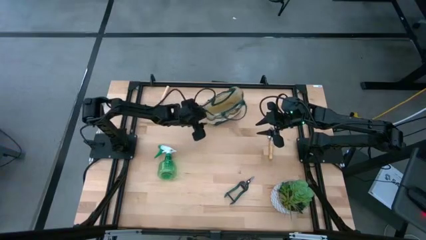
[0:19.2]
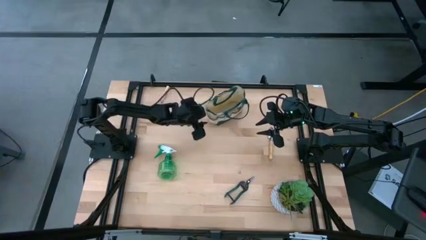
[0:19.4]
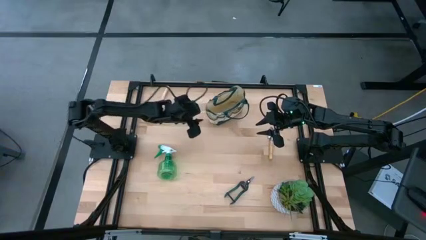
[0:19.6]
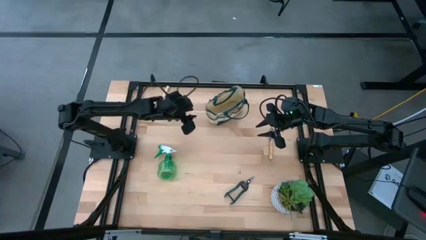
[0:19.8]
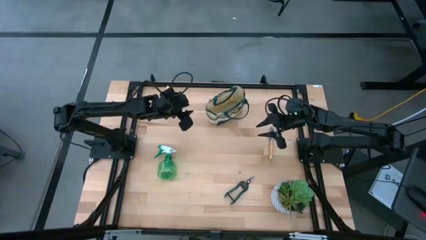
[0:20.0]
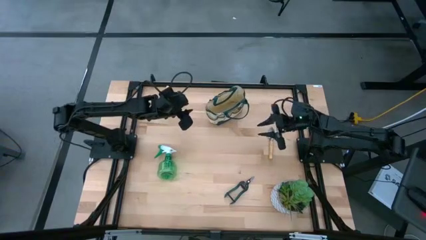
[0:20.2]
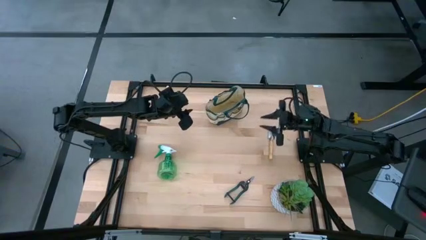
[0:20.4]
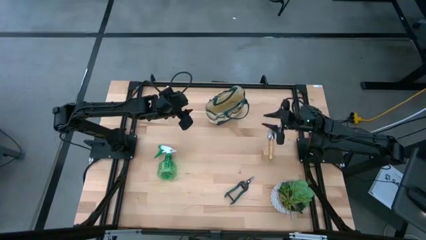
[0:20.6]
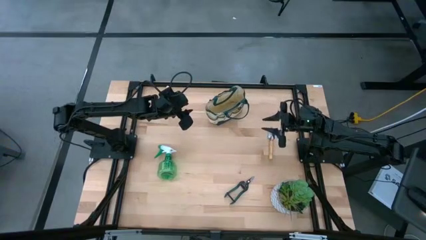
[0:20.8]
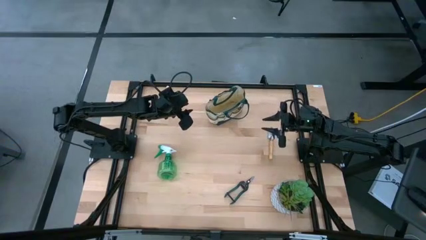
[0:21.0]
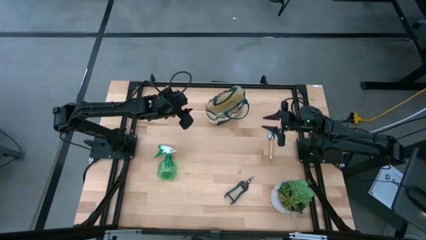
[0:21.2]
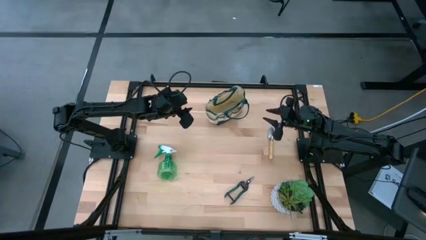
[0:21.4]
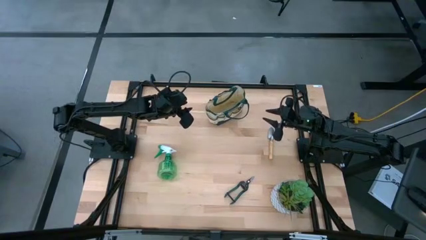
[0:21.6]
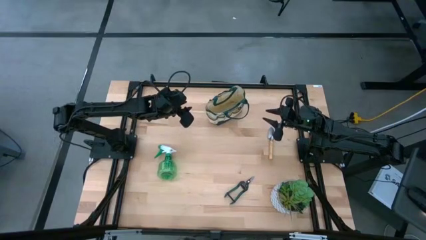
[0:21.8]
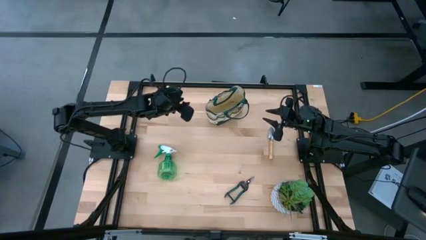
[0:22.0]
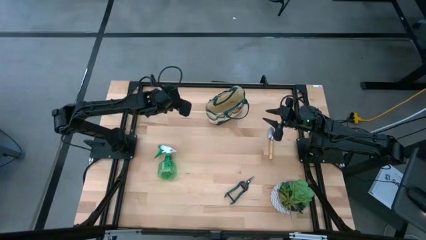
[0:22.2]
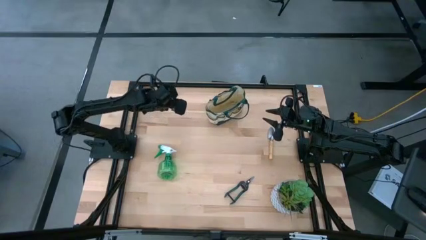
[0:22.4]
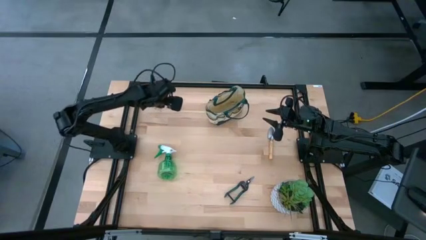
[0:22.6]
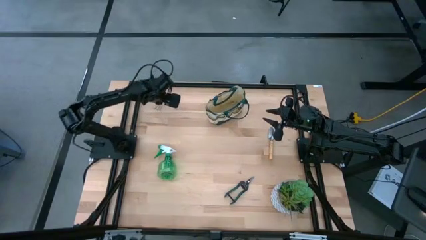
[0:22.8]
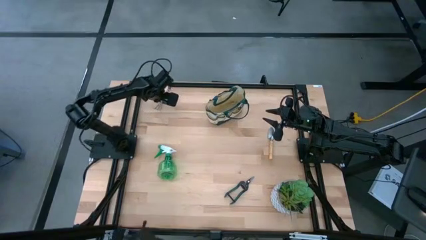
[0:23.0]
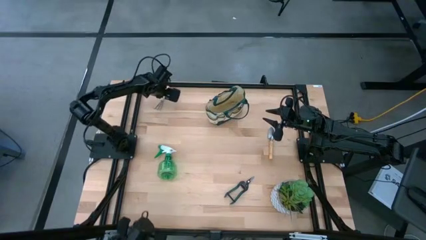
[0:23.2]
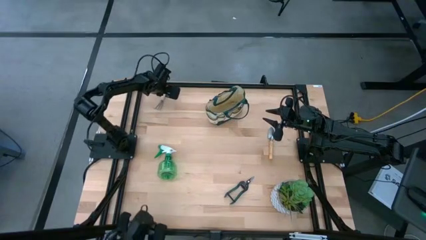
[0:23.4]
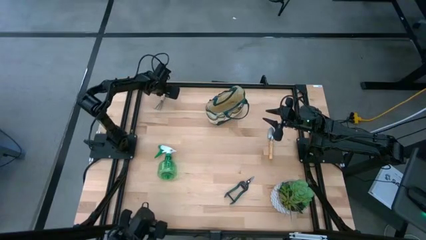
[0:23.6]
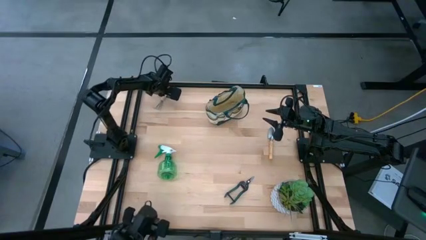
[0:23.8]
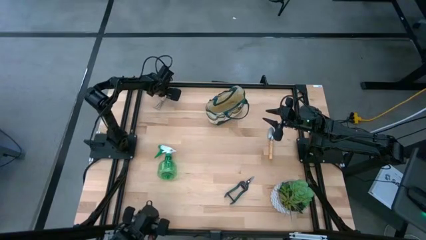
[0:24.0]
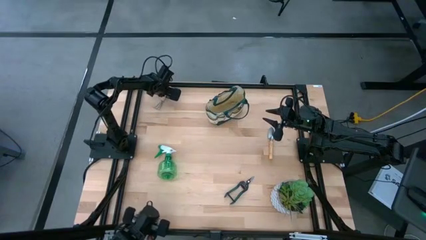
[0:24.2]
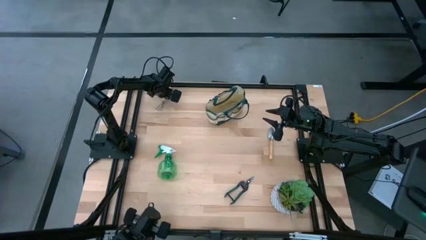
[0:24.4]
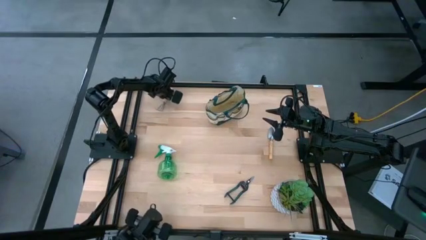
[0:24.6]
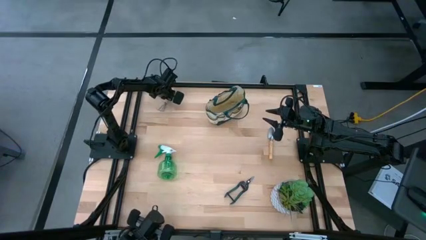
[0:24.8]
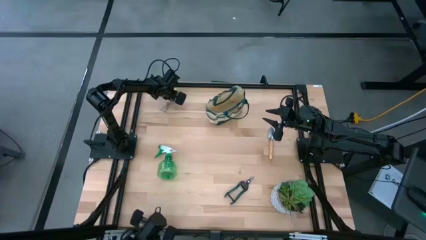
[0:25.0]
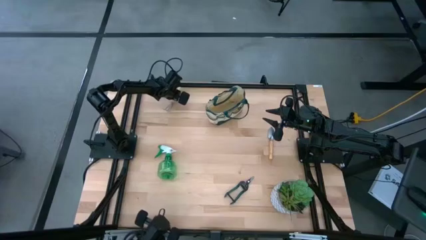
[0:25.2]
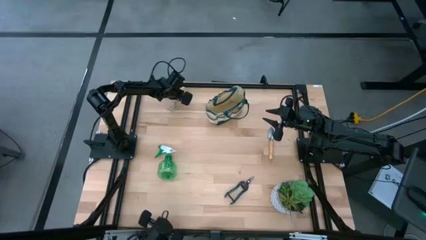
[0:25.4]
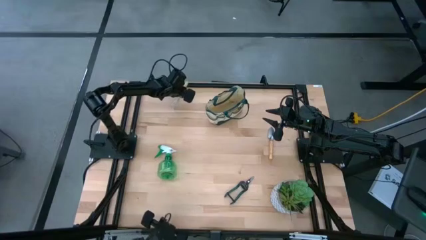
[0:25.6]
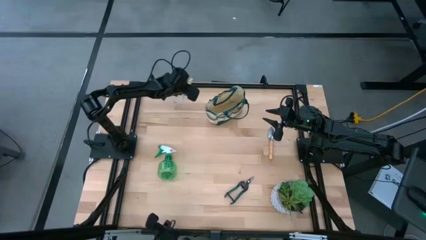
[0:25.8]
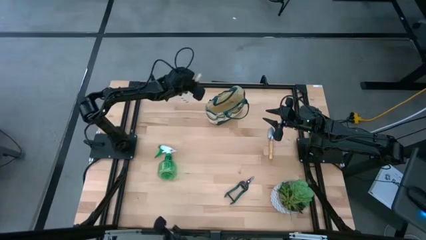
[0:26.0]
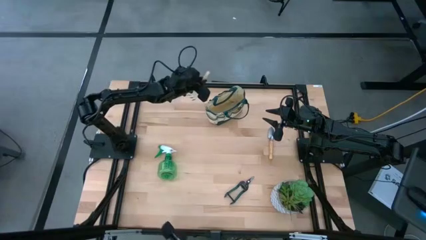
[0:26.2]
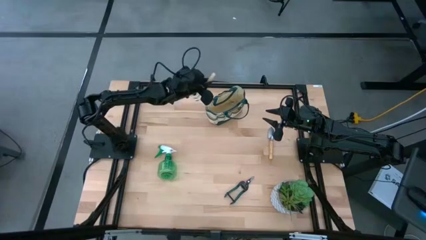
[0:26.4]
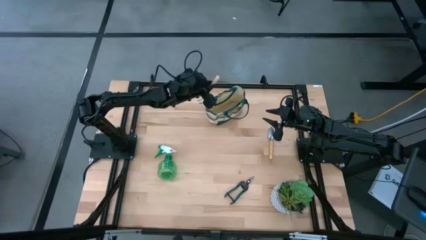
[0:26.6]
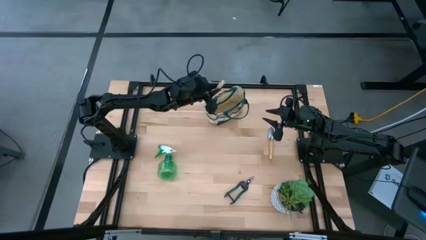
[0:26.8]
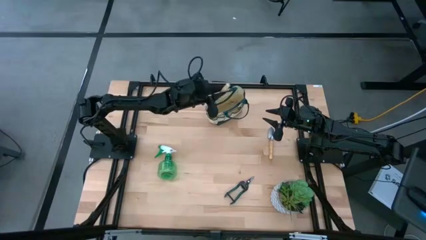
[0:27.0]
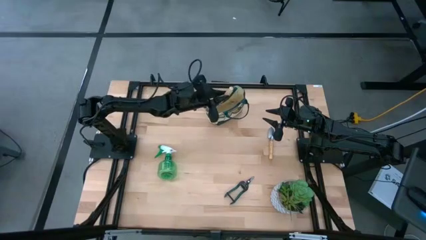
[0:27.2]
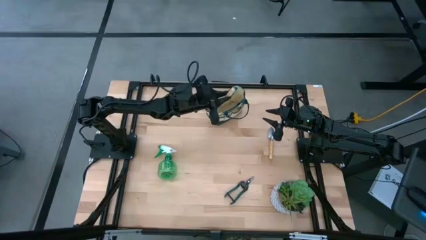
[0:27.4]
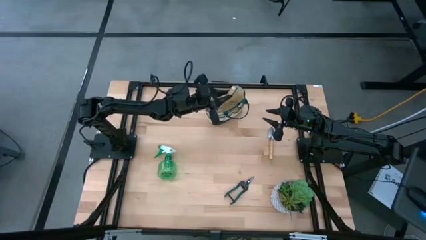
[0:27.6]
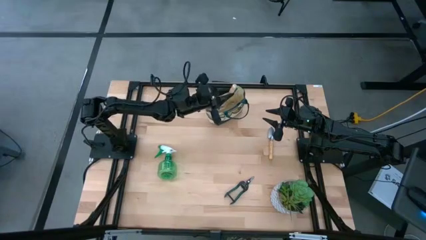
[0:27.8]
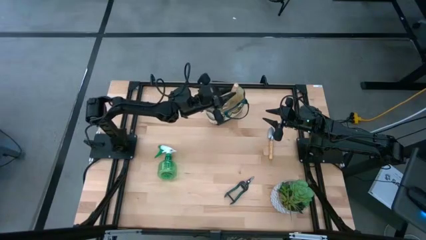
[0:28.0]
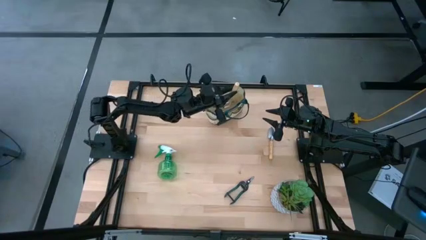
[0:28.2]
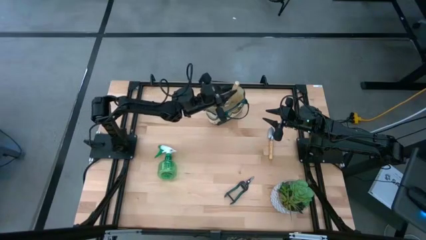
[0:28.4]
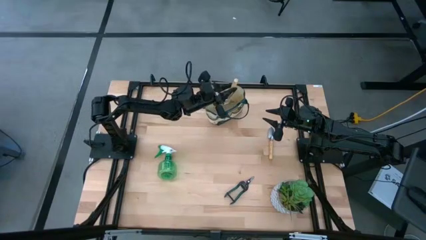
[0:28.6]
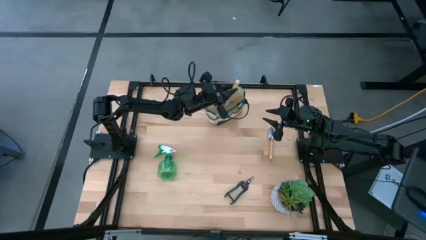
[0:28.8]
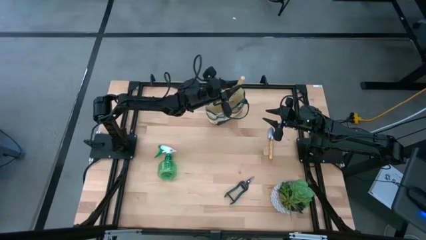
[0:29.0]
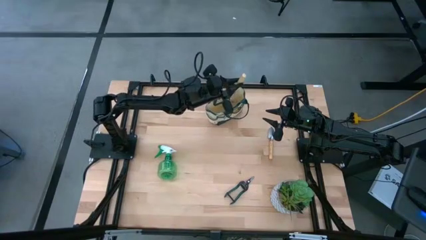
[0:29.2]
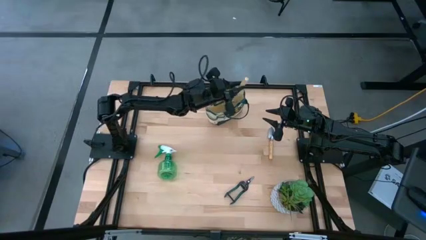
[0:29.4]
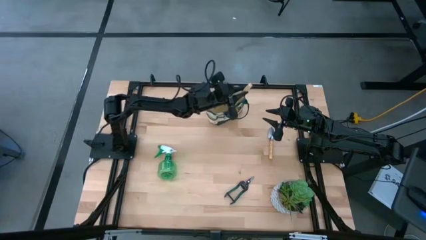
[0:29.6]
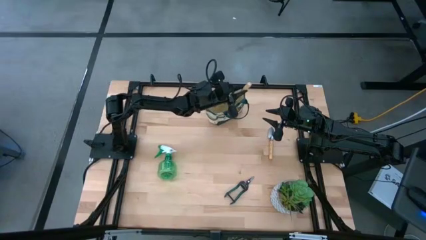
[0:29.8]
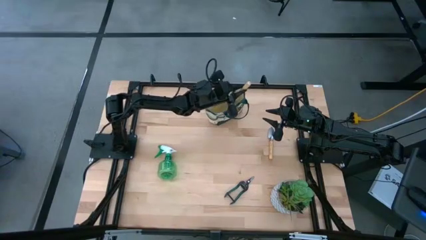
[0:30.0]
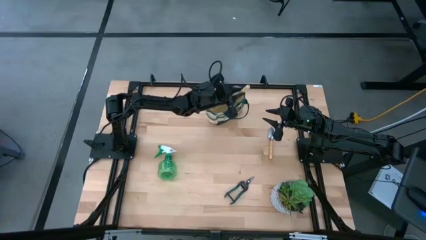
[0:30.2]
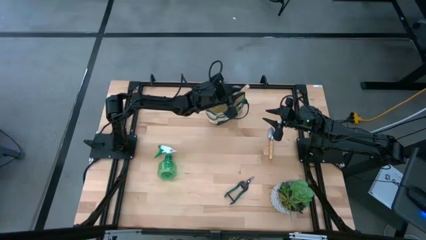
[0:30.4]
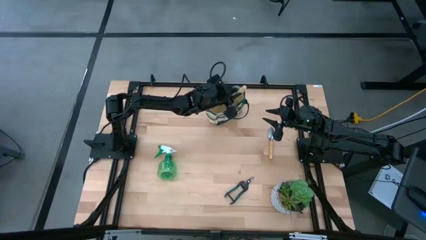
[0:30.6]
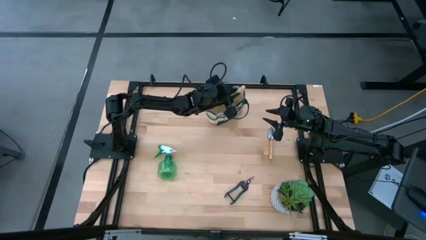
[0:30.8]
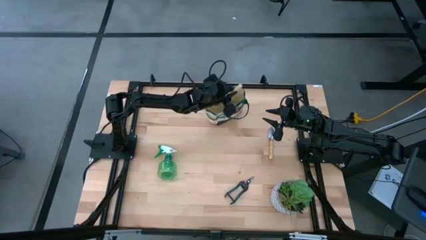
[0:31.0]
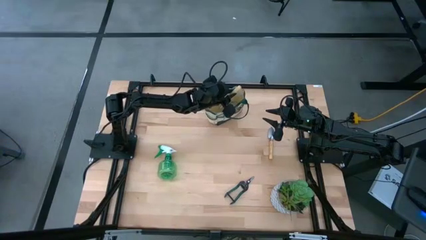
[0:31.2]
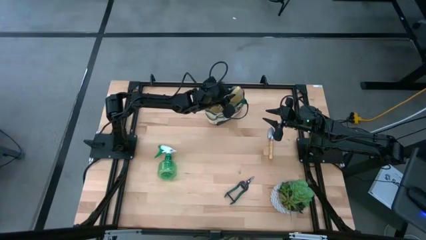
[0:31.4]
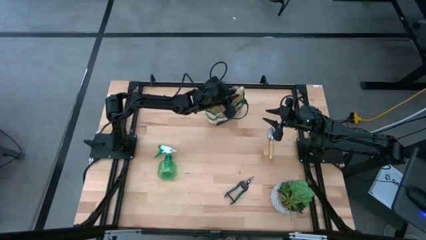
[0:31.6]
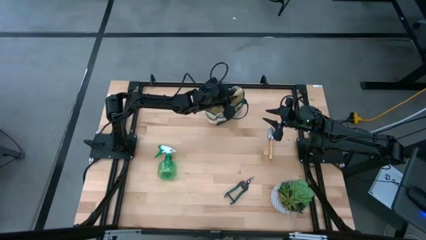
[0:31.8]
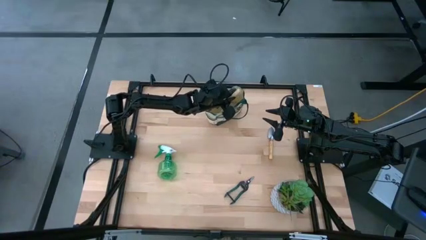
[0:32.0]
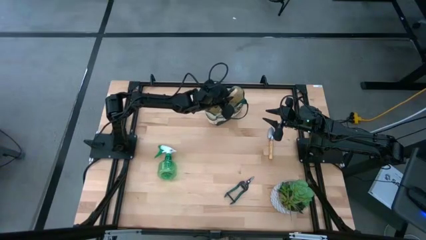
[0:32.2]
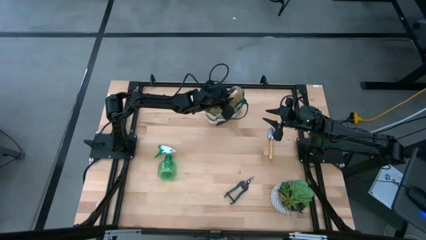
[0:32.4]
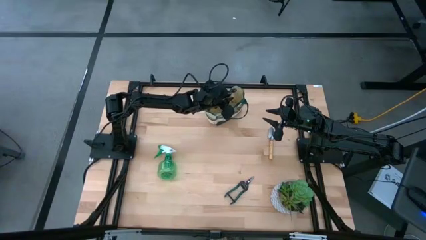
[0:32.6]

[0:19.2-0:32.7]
Task: Pick & Place Garden tools in Gardening bag
Put the brown hand rake into the green gardening bag

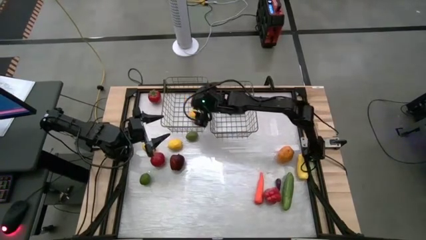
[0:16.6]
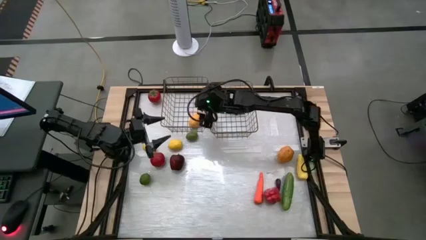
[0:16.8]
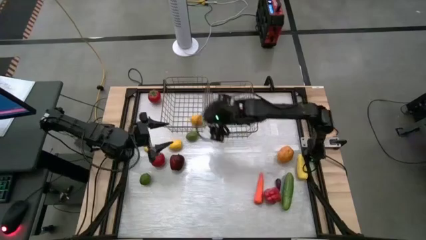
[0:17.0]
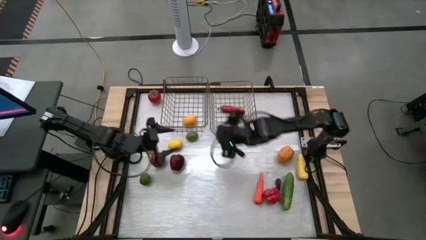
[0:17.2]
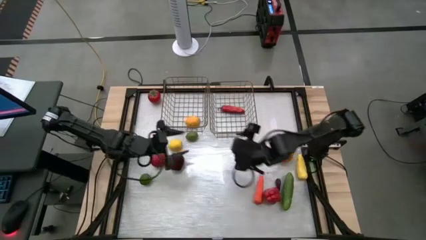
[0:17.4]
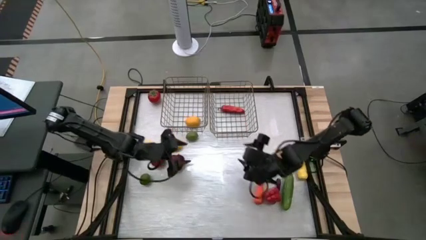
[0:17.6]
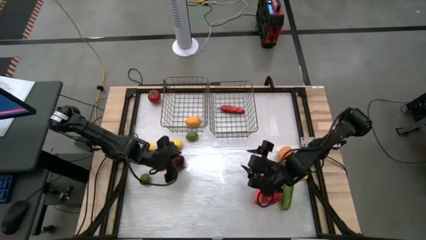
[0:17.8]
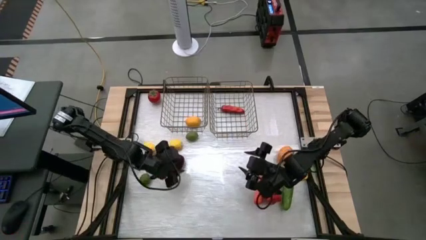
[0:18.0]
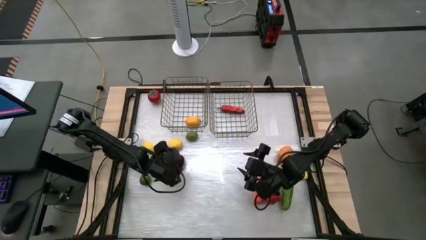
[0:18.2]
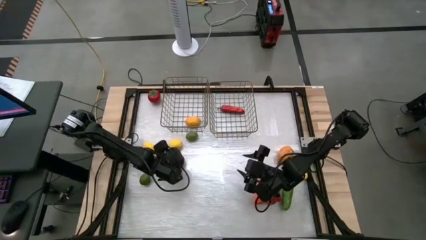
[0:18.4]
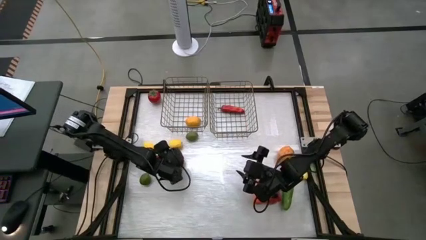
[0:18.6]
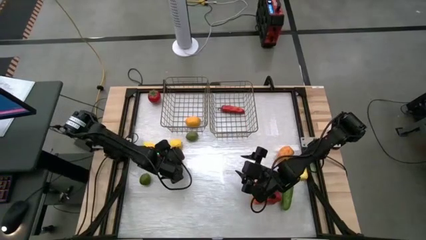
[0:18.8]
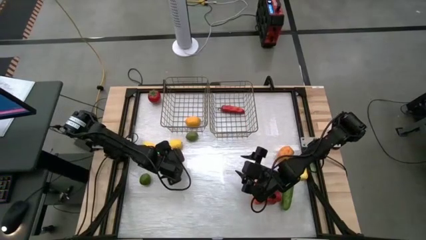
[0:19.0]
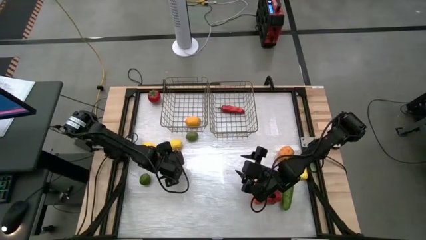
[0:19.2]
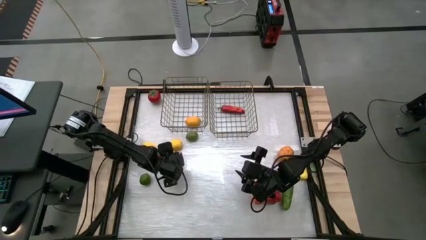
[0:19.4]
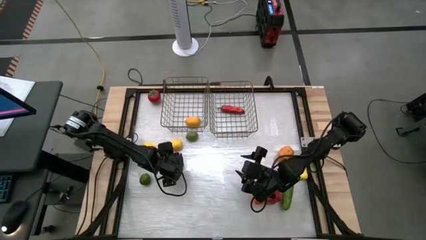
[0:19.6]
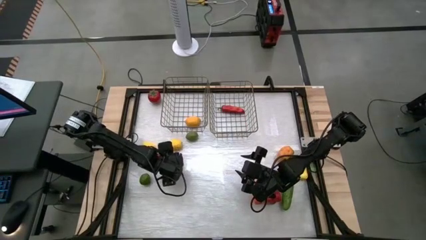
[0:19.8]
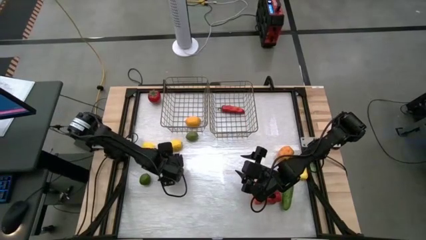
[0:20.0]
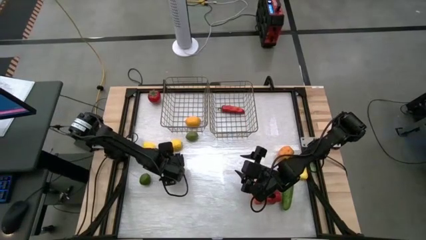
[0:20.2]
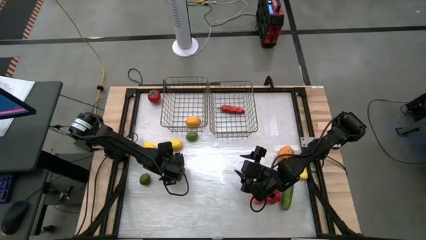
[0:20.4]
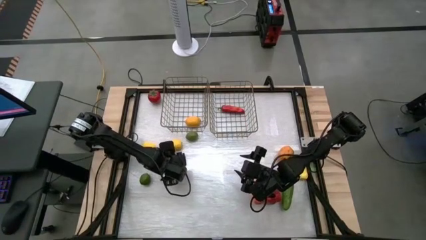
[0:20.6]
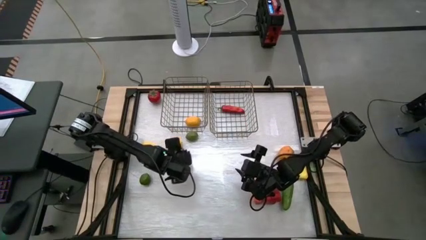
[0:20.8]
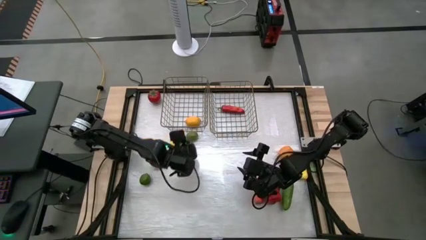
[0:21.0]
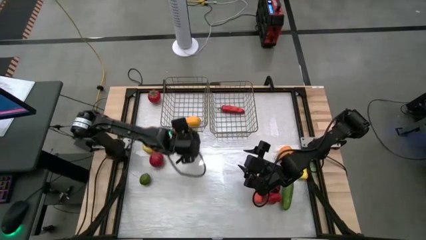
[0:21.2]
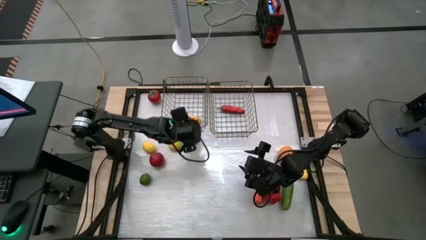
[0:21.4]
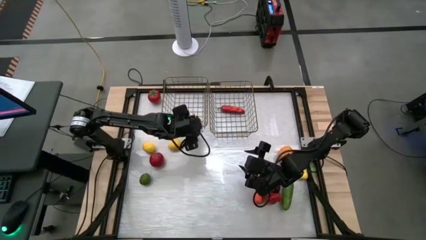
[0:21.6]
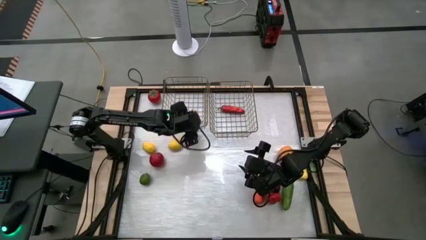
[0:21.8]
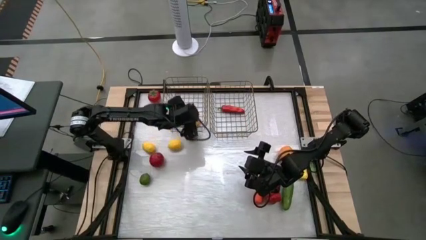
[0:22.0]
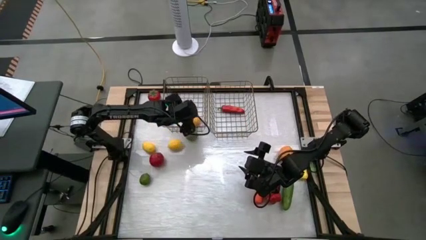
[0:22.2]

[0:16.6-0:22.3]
Task: Sort produce into baskets
Put the apple into the left wire basket
